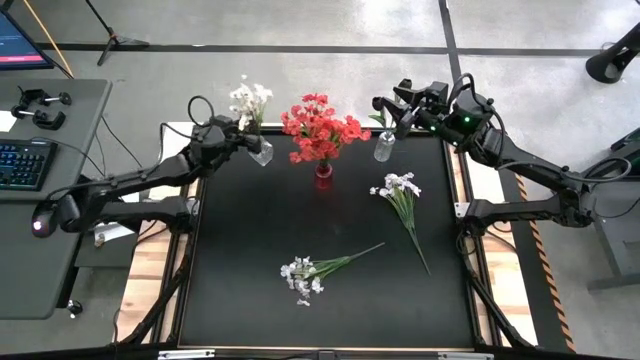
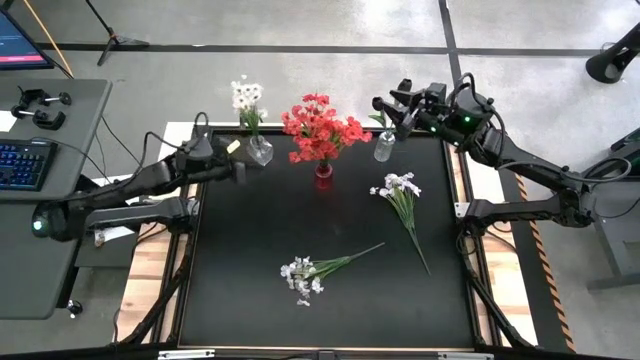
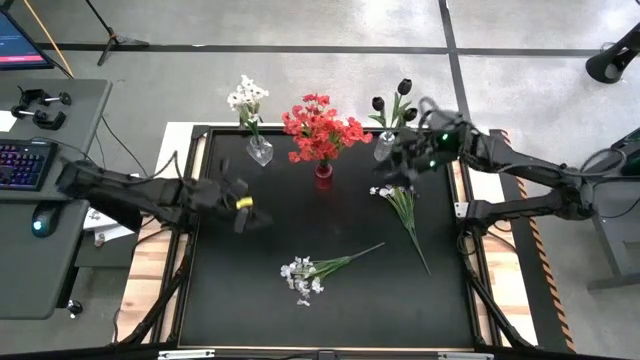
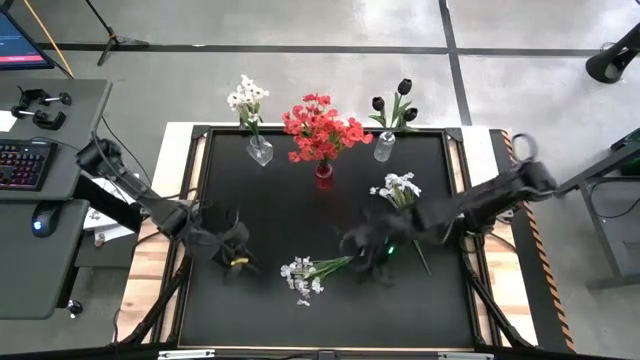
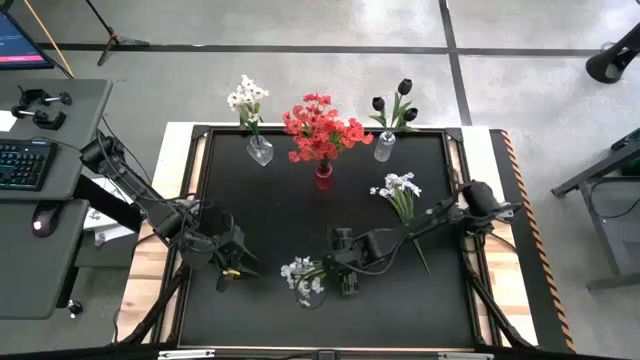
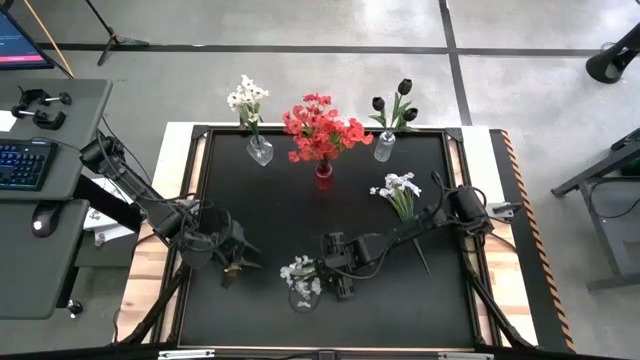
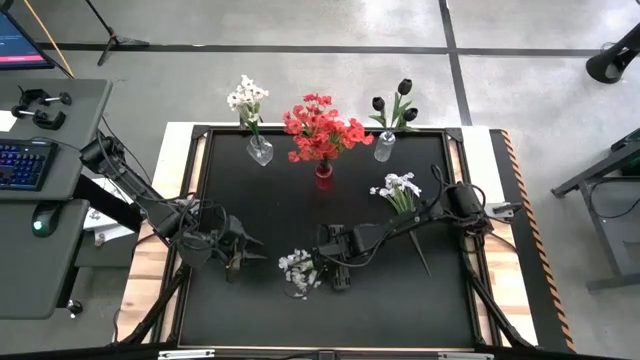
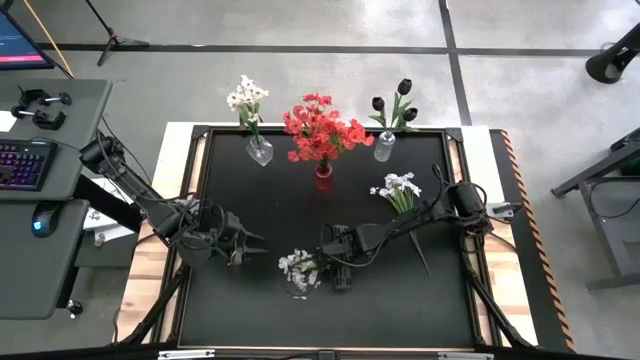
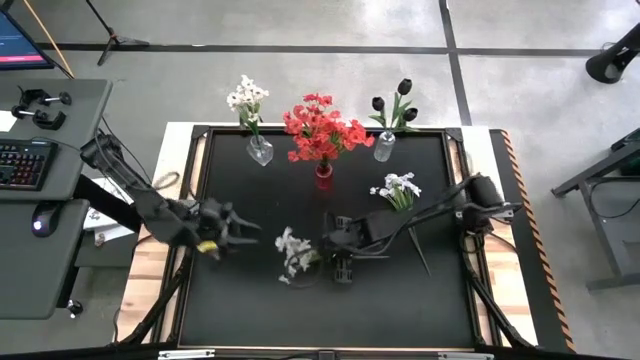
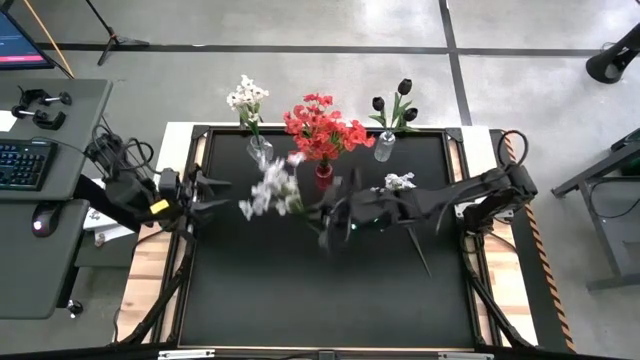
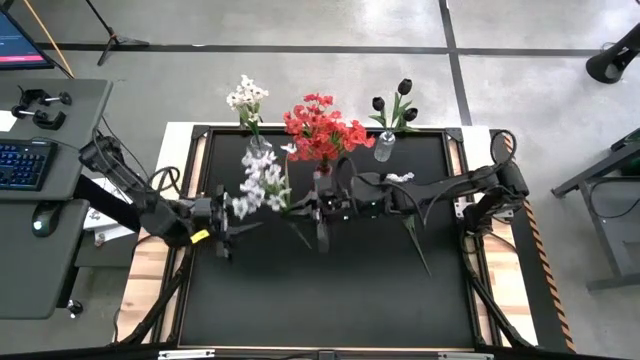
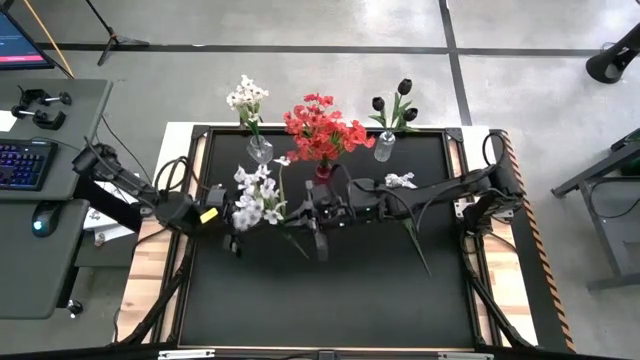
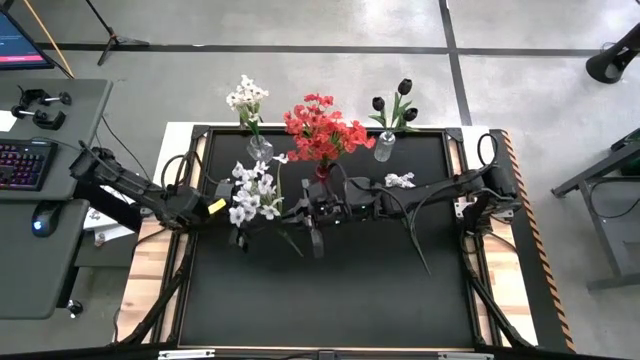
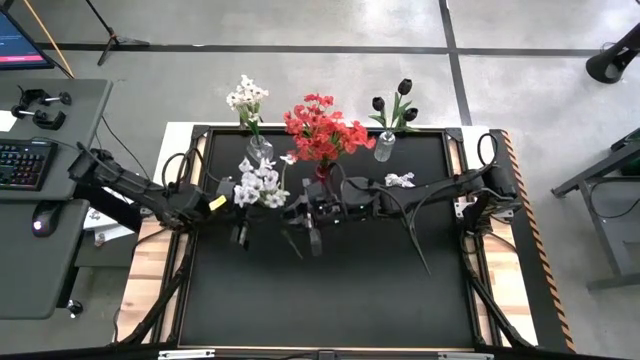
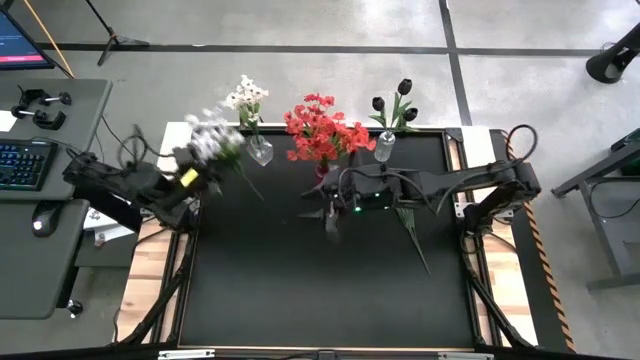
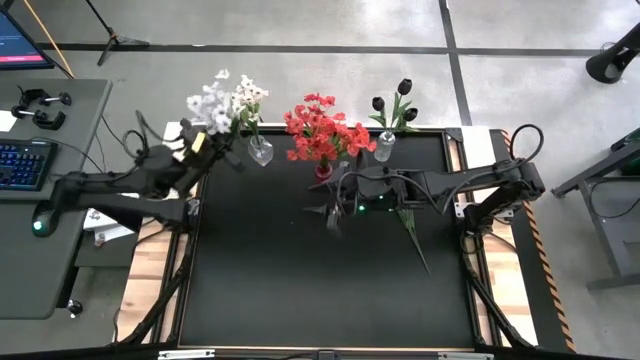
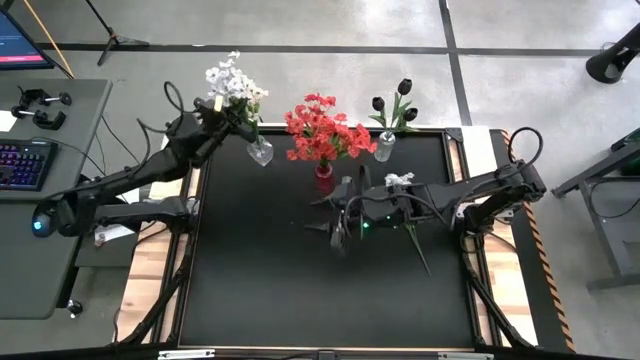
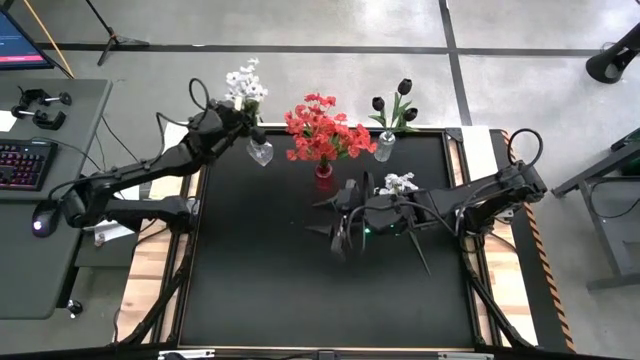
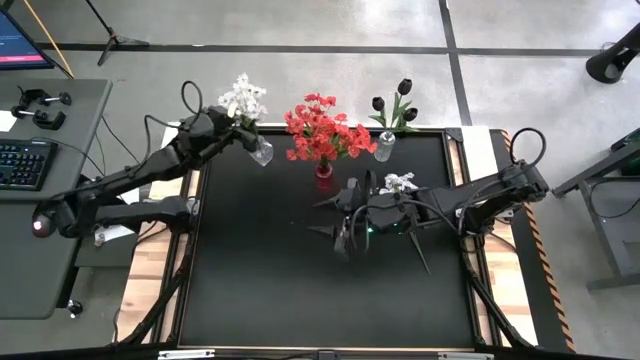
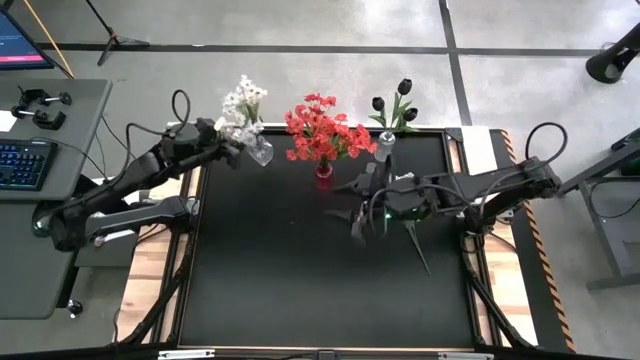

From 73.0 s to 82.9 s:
Task: Sort flowers into vase by color
Put the bottom white flowers into the left transparent flower vase

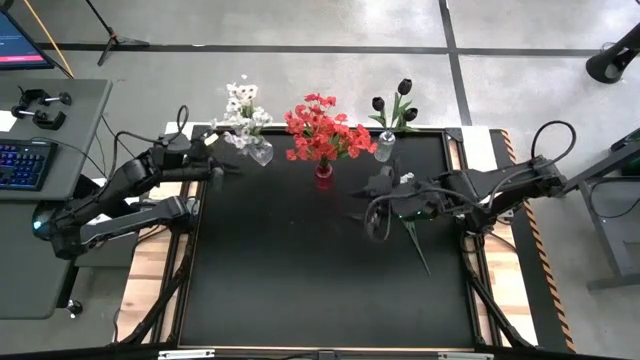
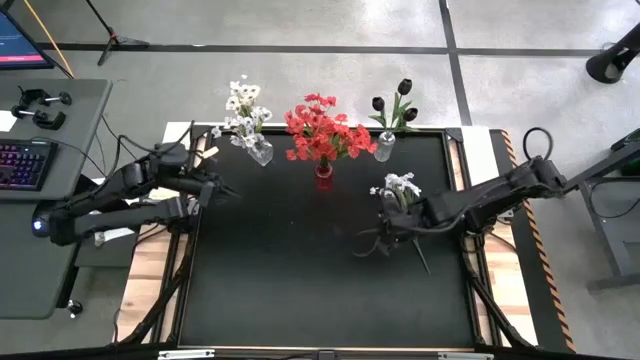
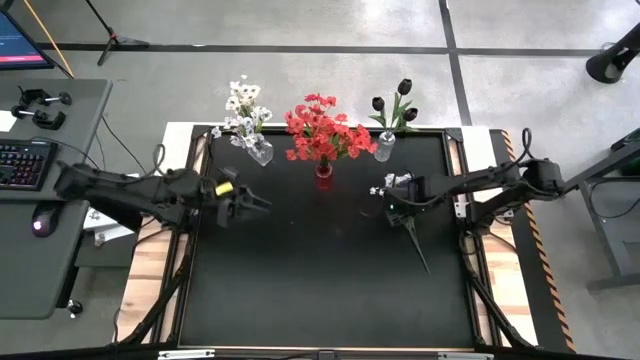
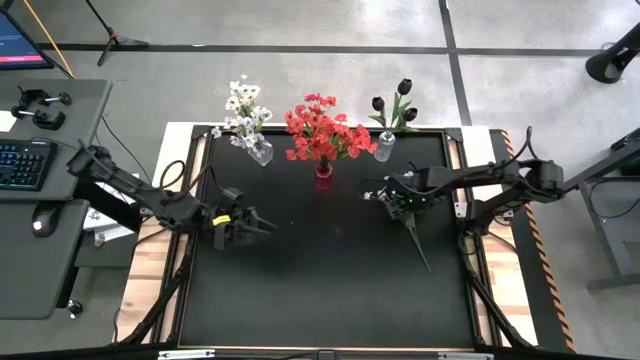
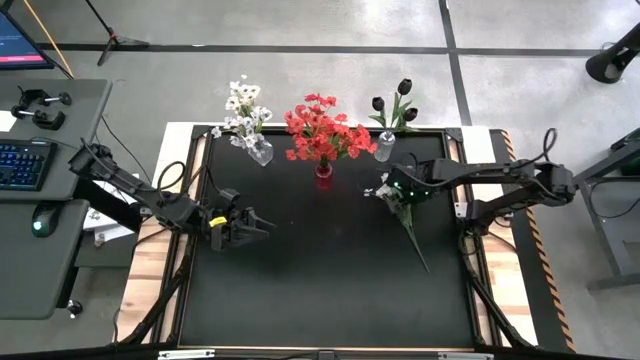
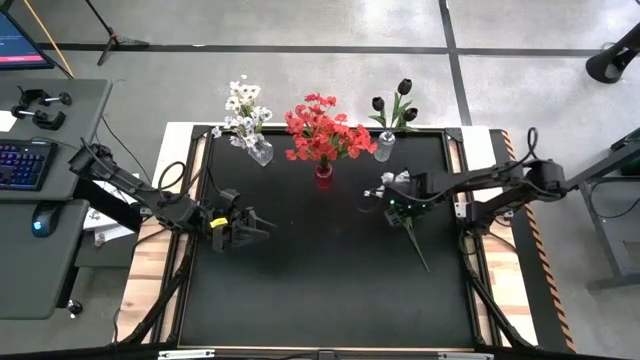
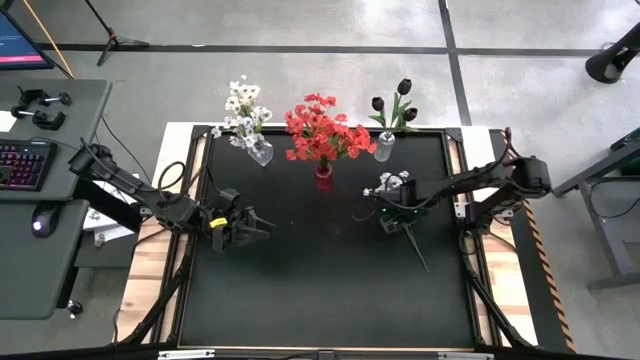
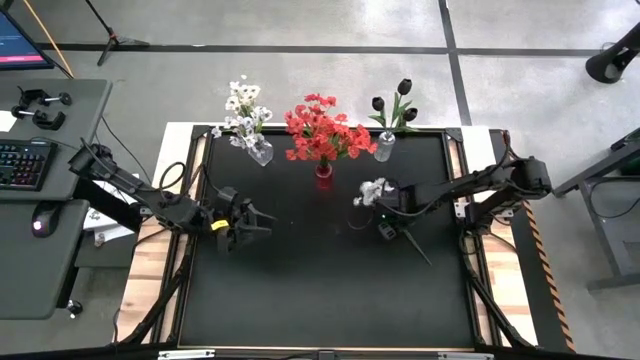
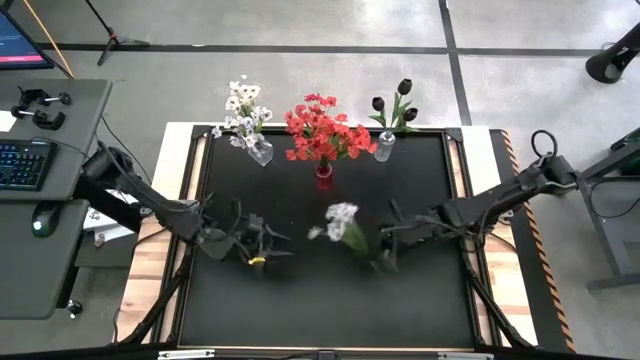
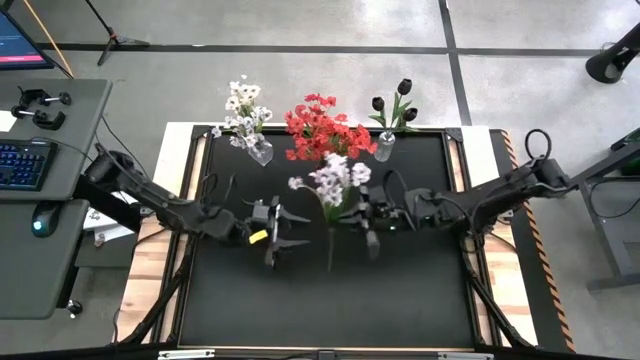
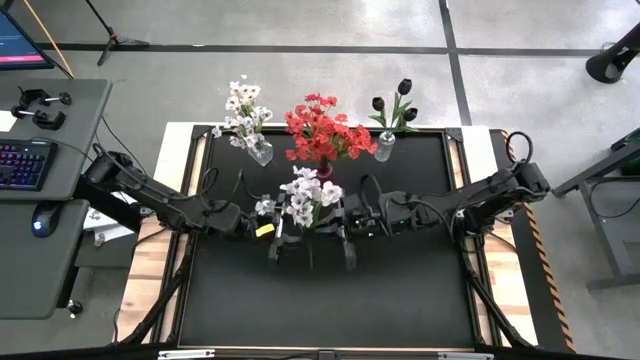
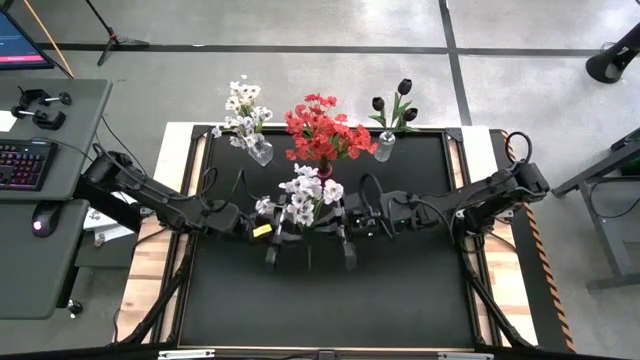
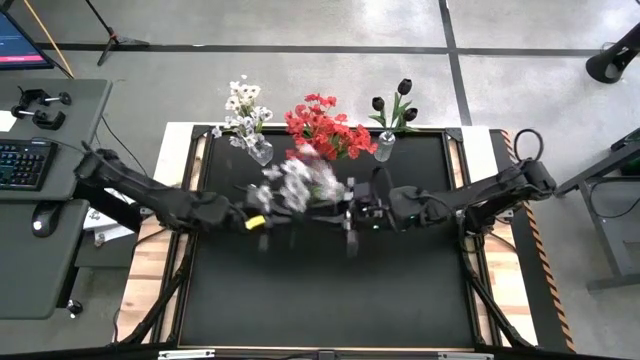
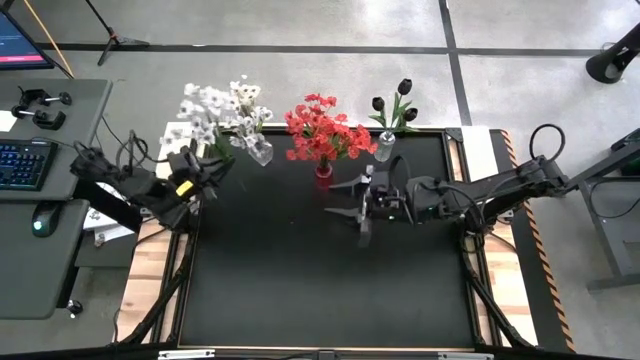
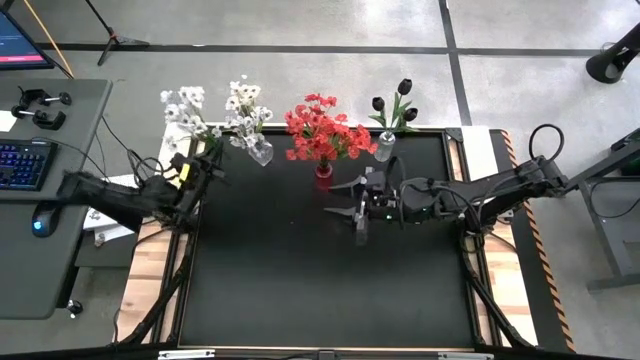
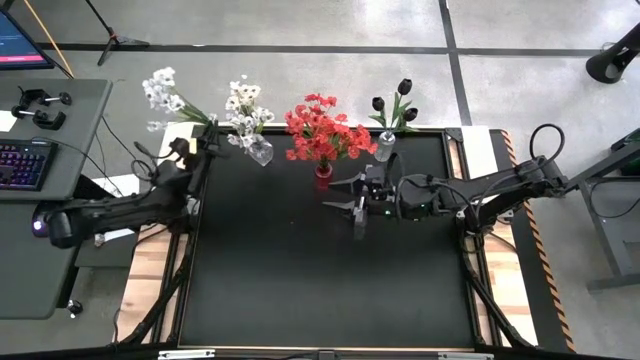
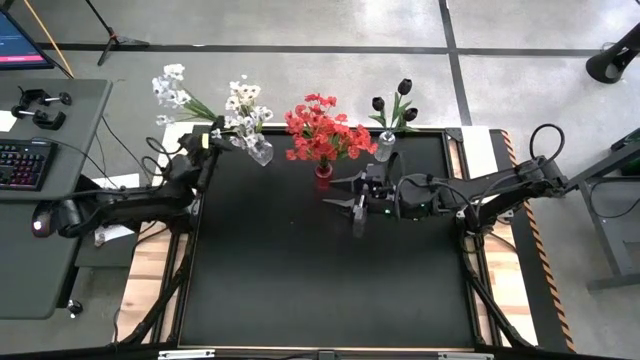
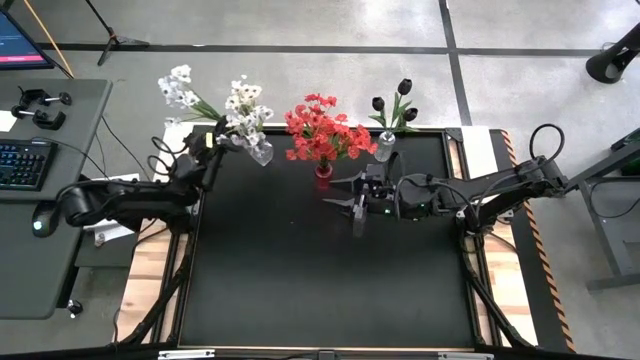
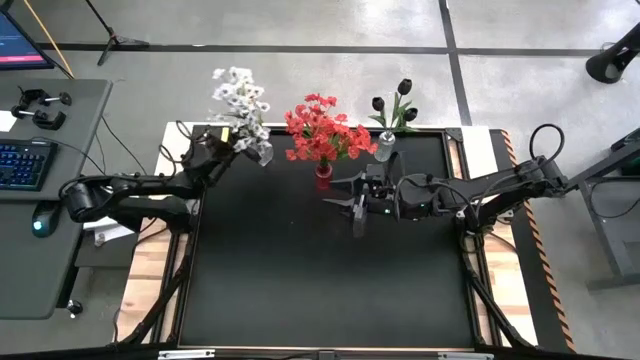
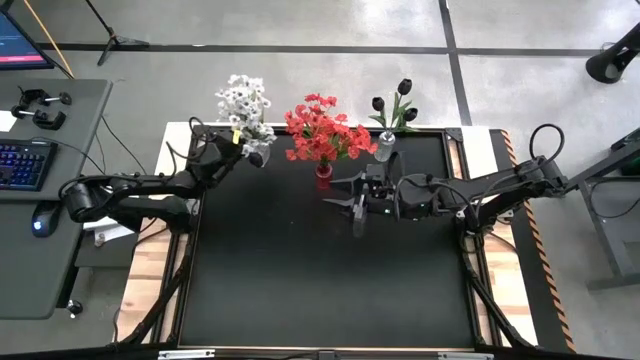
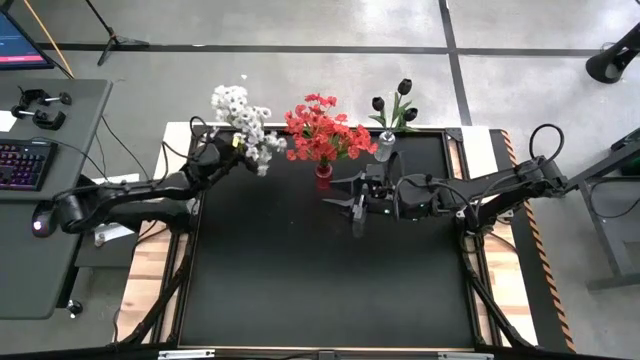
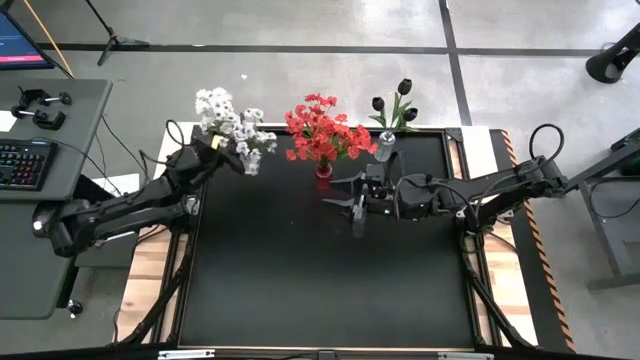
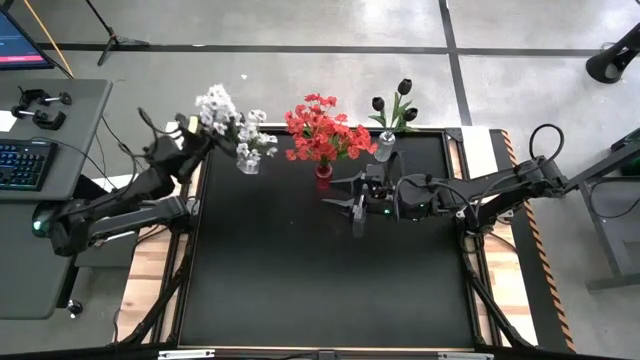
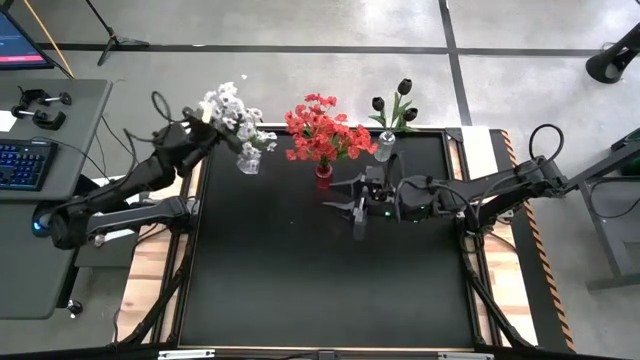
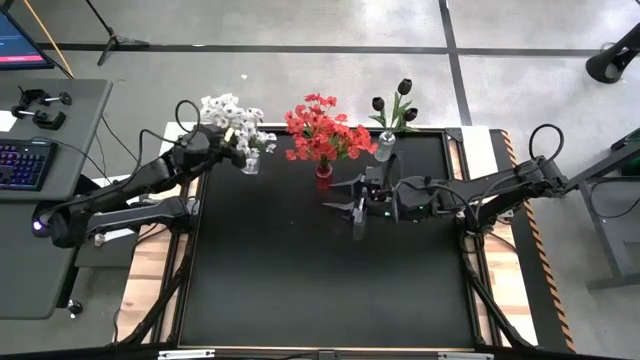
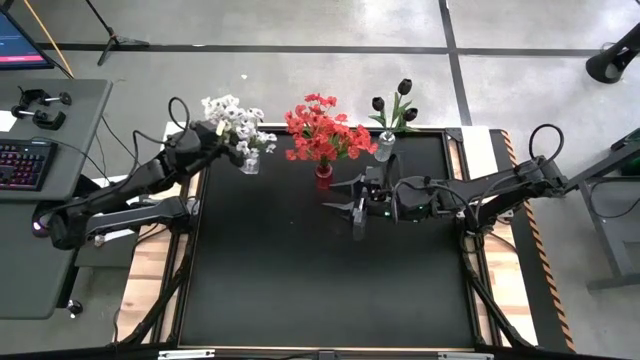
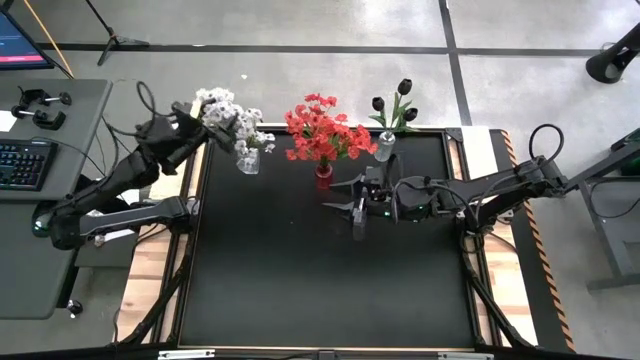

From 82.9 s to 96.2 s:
Put the white flowers into the left transparent flower vase
